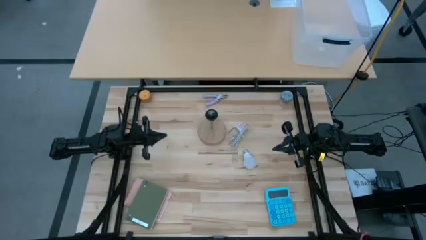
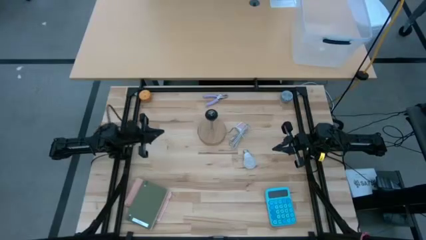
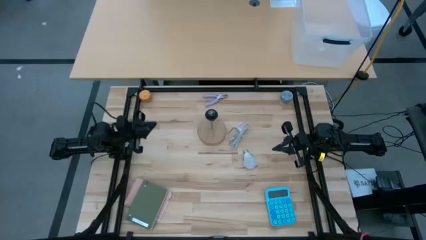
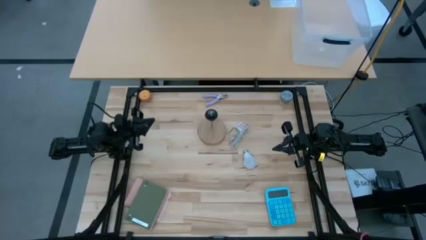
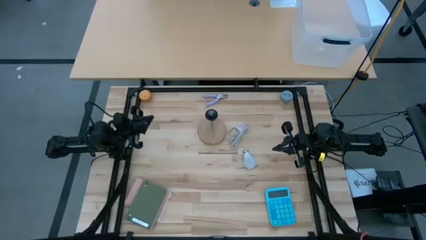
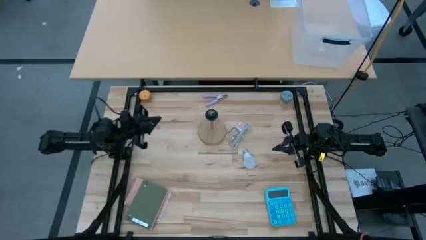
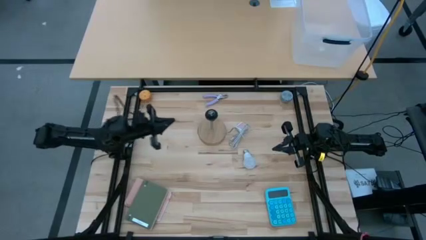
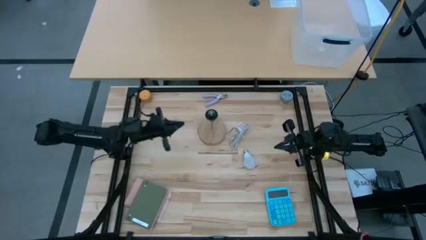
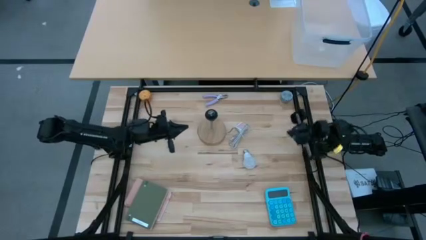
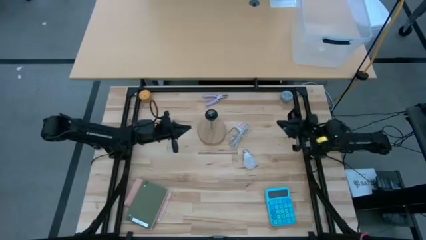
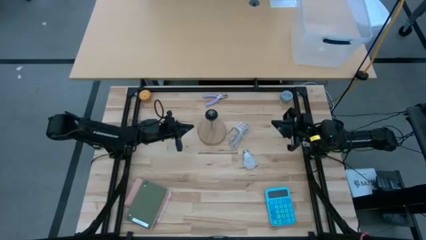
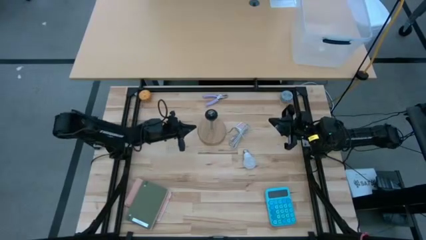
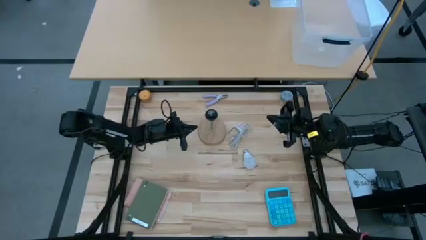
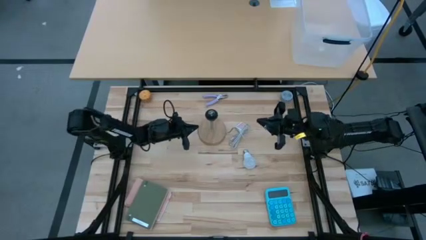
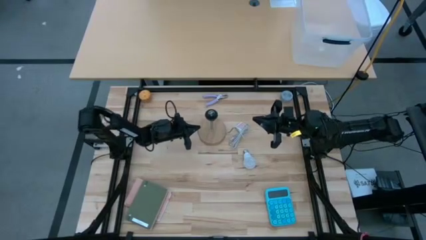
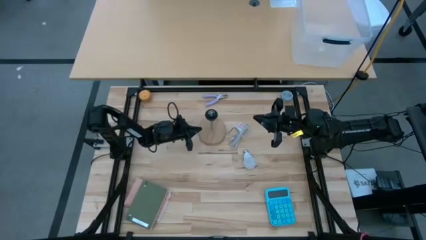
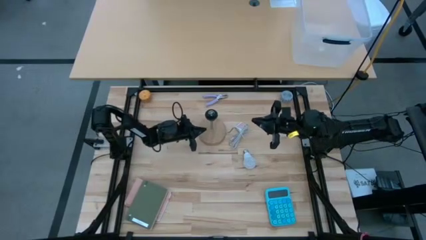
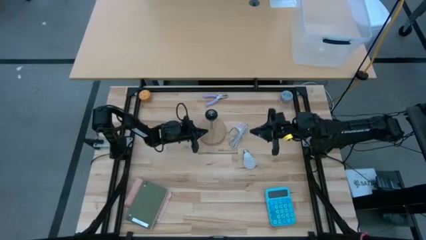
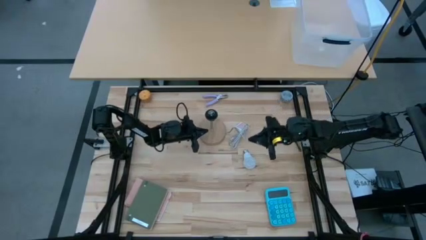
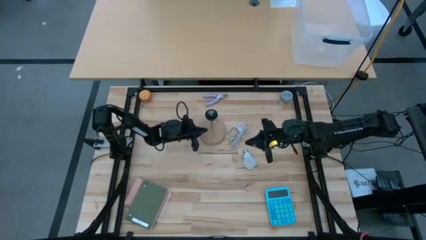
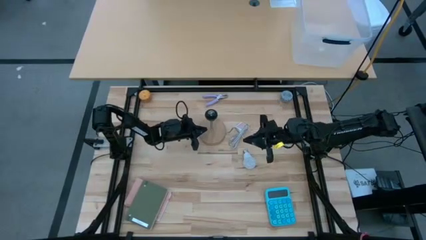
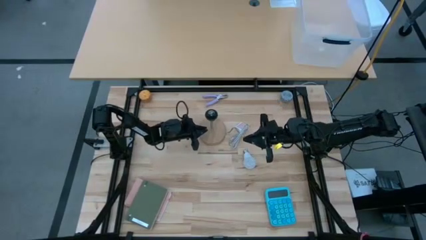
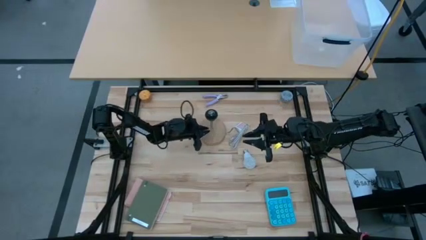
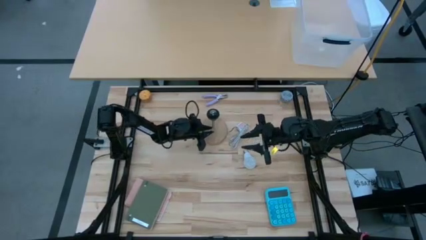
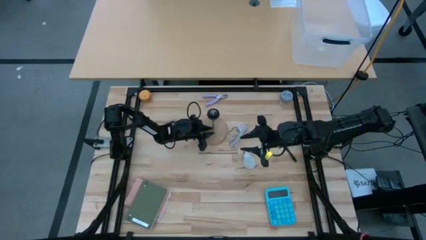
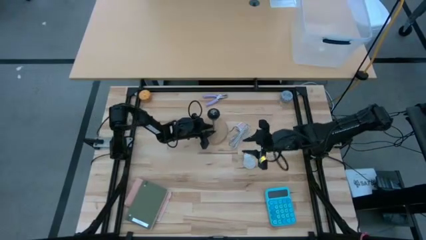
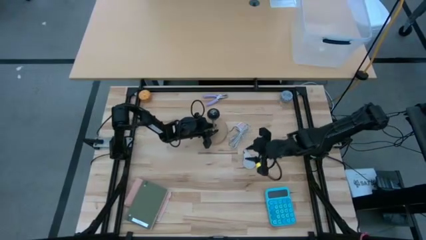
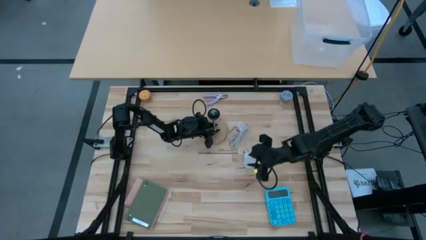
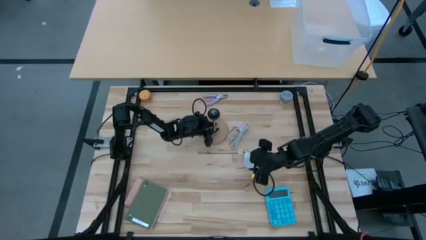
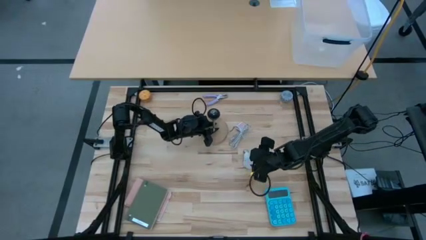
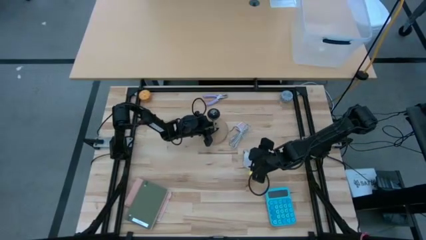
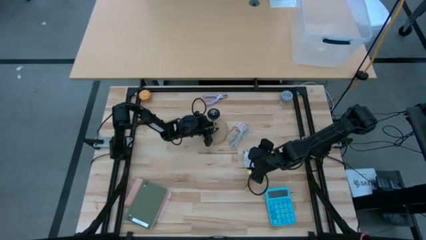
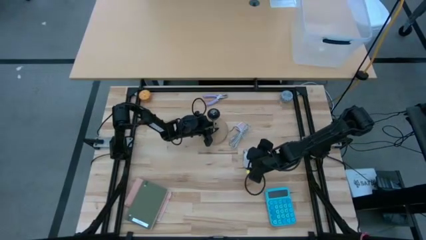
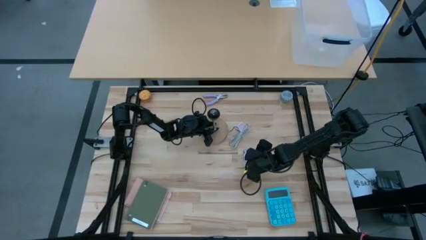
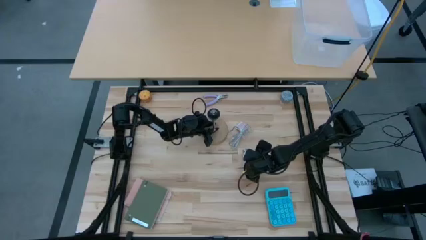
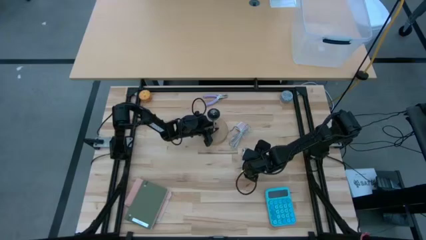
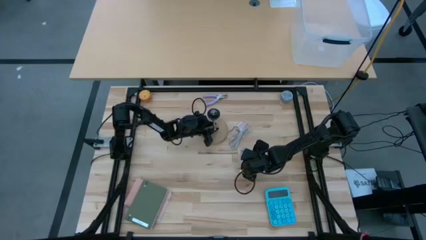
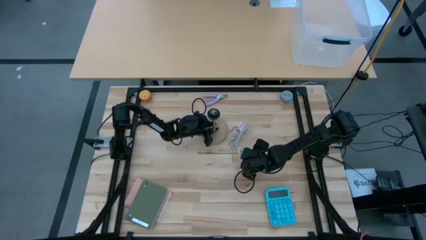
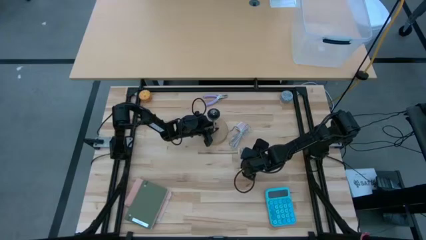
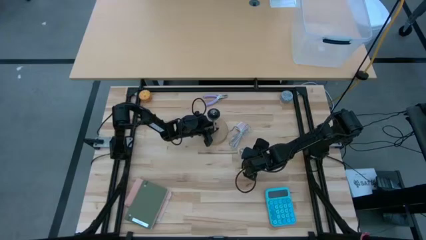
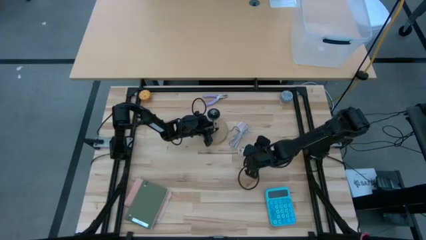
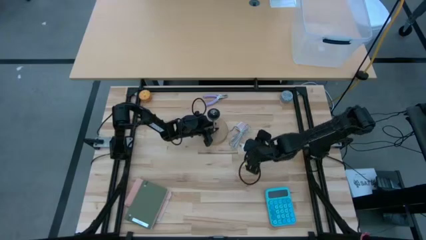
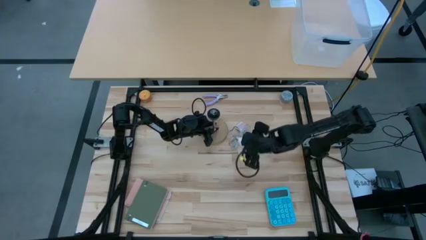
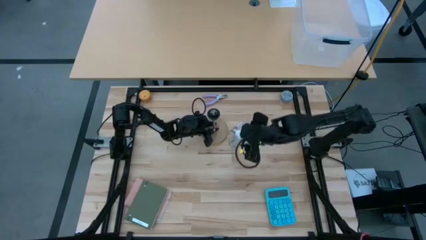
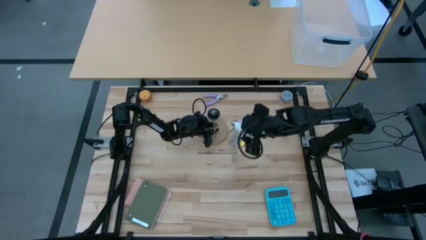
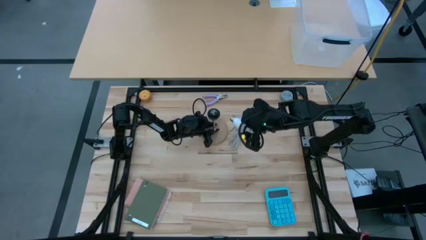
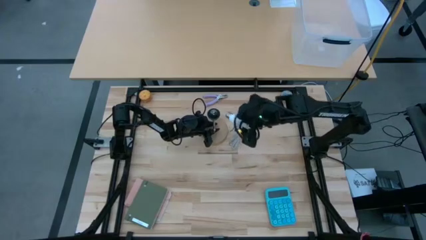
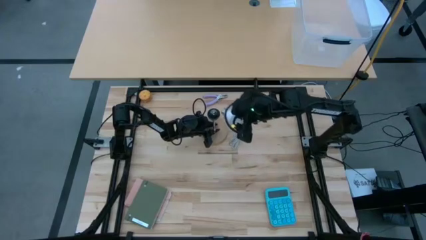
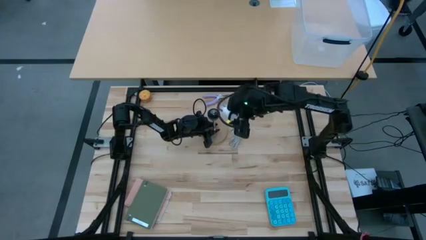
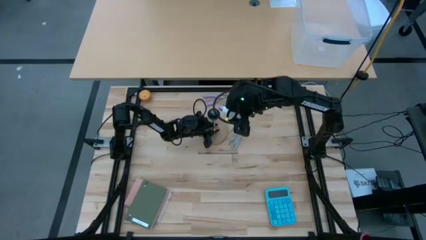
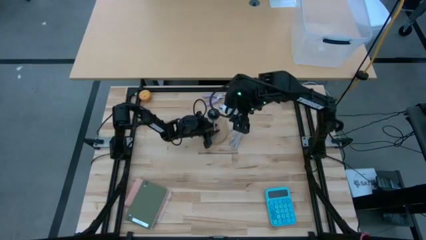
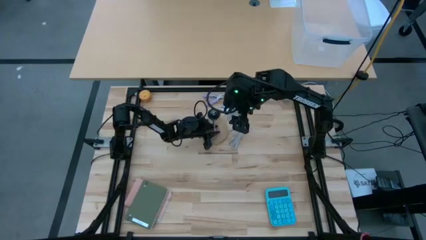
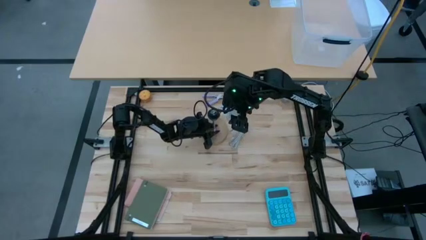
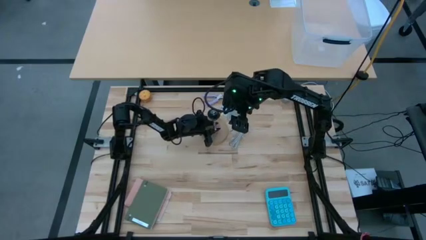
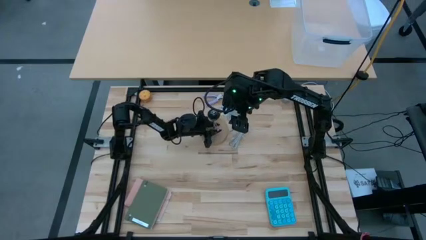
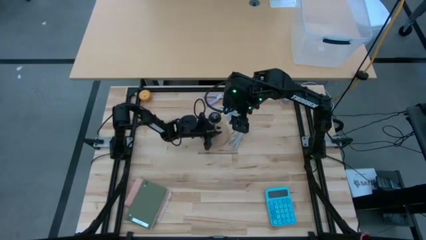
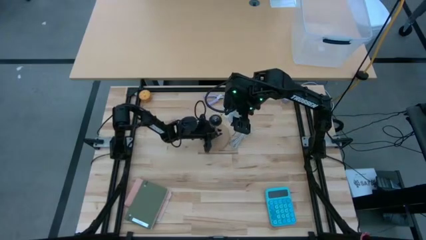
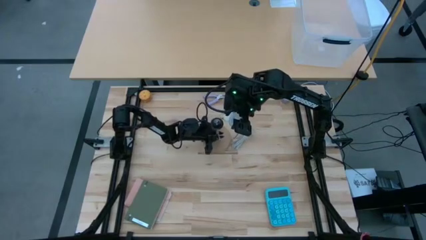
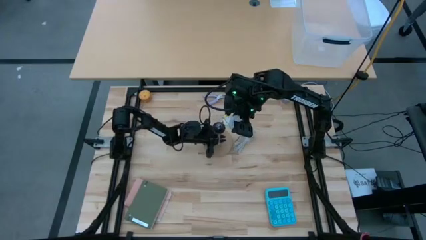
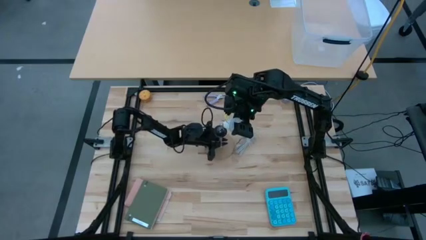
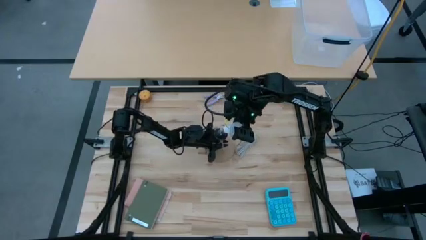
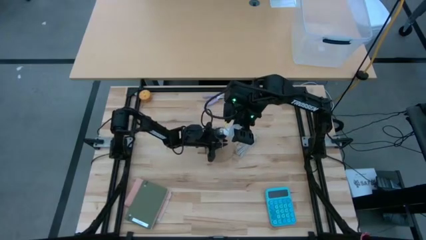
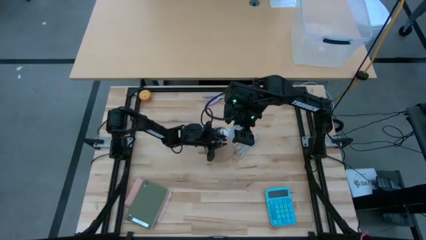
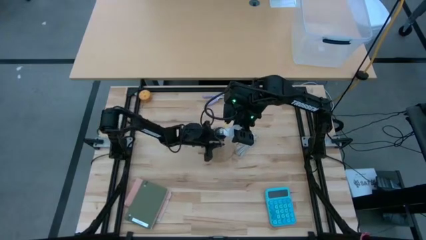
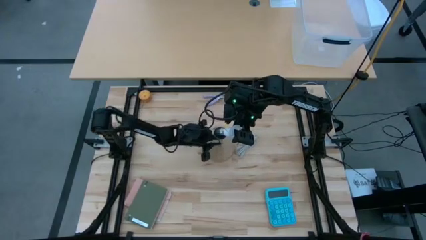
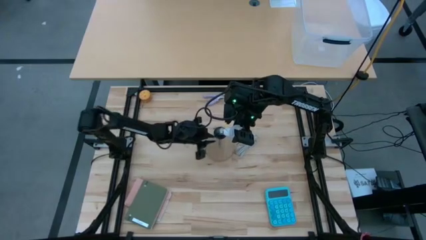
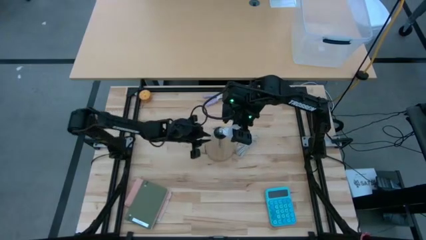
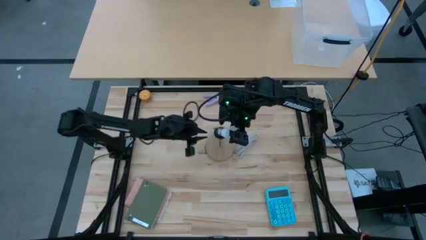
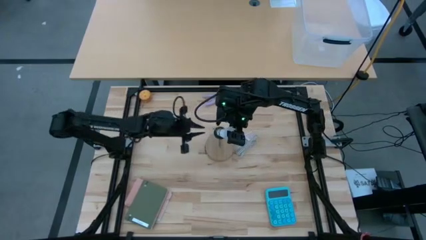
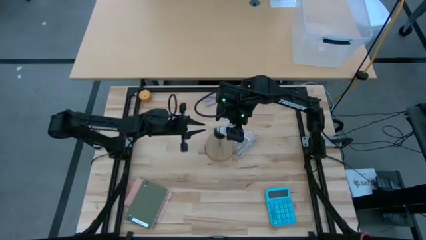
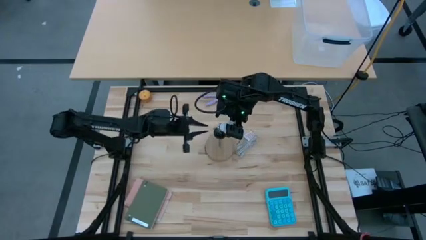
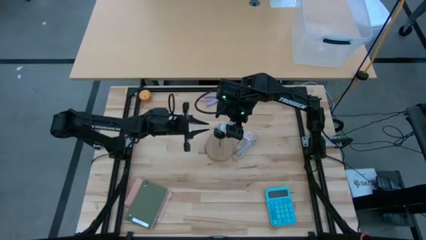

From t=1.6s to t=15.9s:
Task: Screw lightbulb
Insert the light bulb on the brown lamp

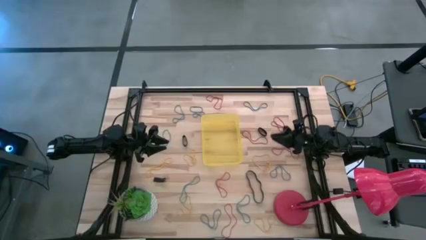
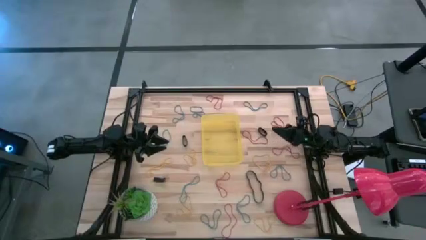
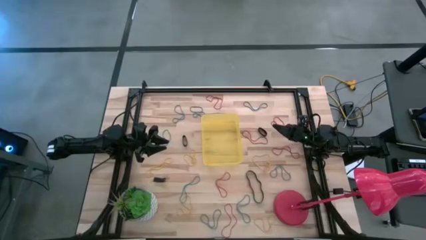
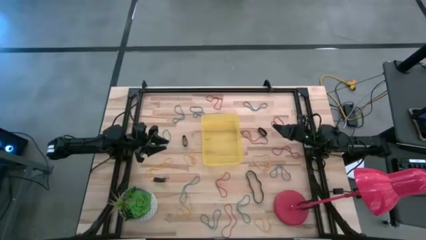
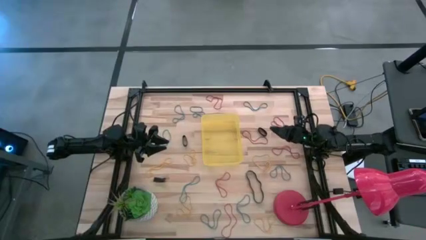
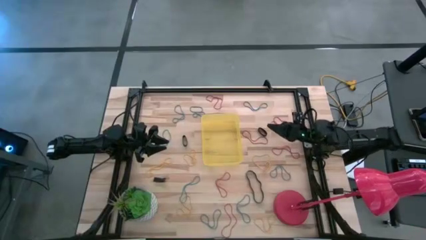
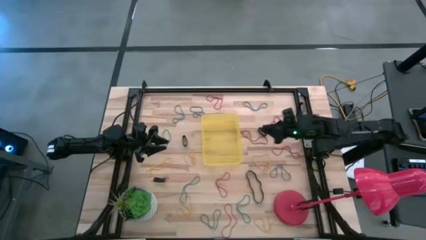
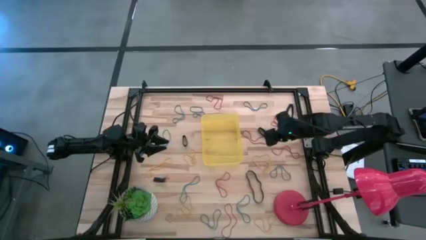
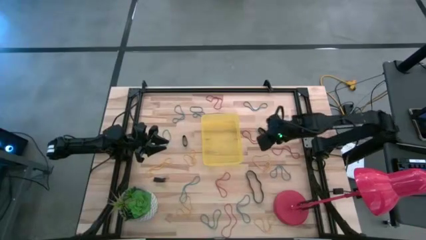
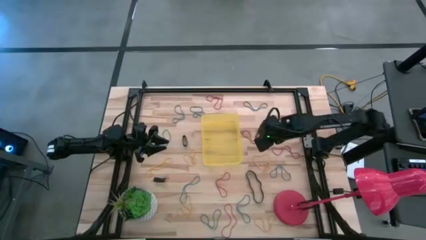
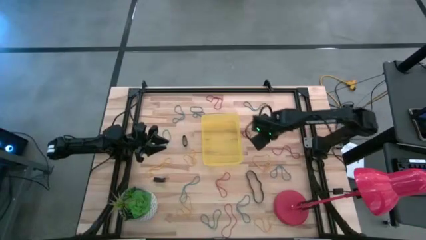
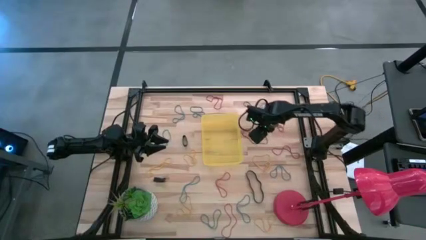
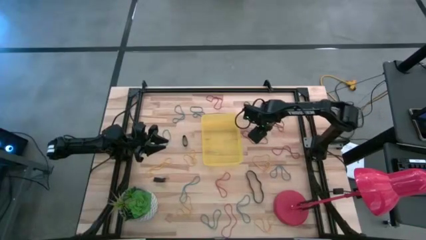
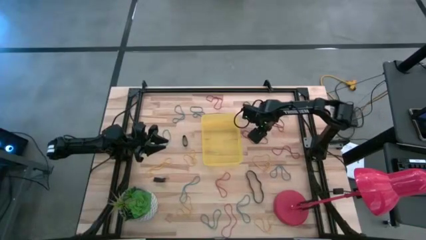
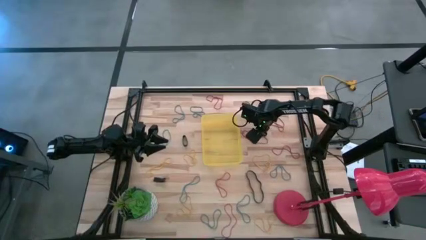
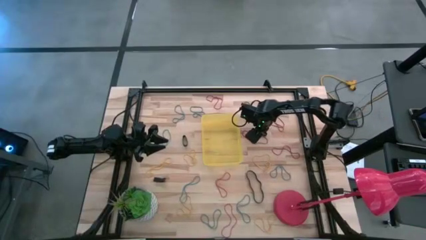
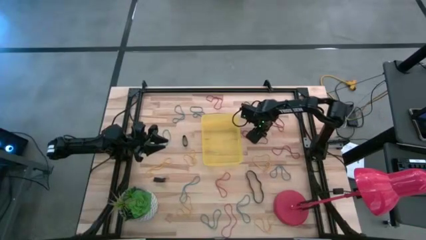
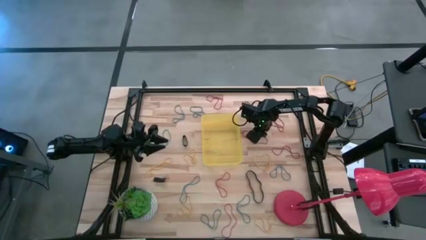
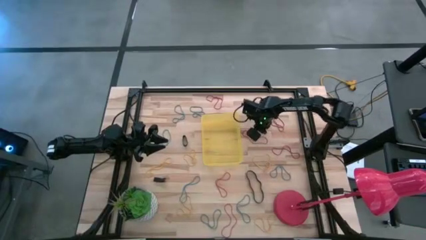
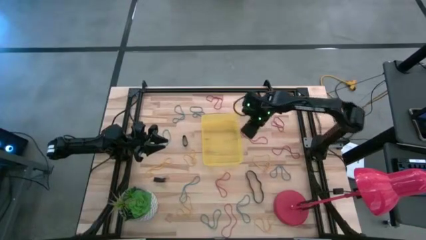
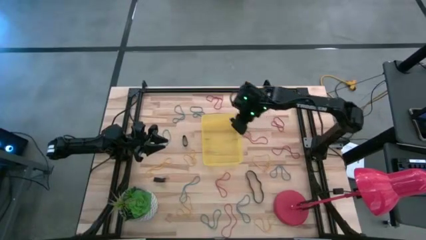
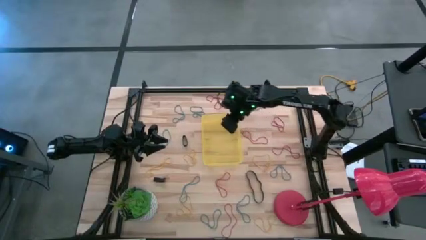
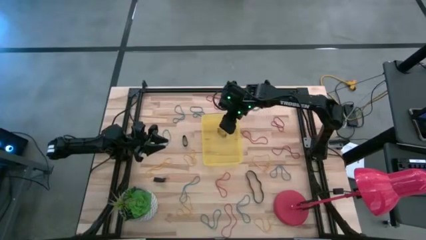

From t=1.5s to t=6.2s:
Task: Pick and place rubber bands into bin
Put the right small black rubber band into the yellow bin
